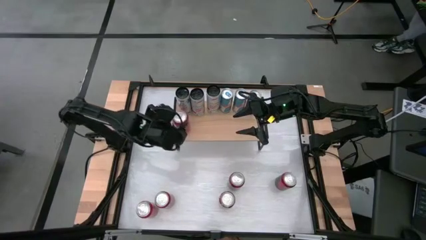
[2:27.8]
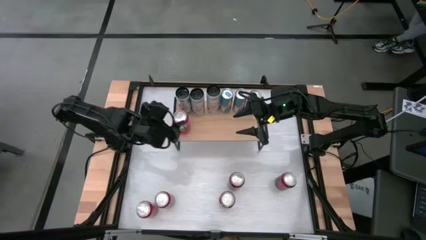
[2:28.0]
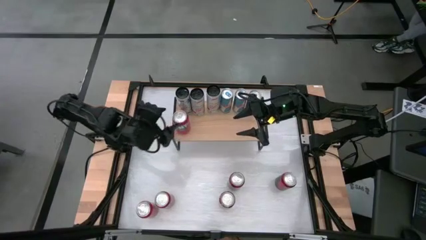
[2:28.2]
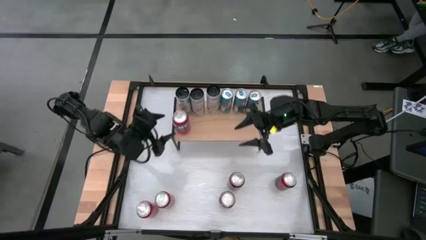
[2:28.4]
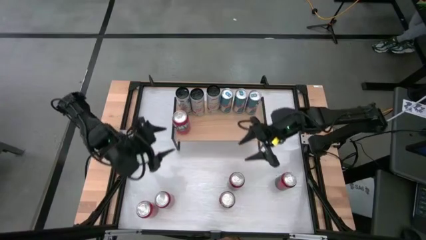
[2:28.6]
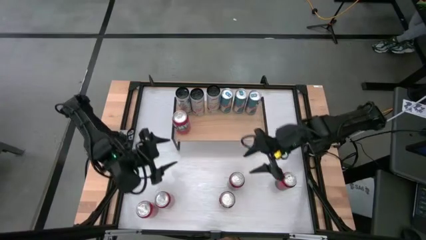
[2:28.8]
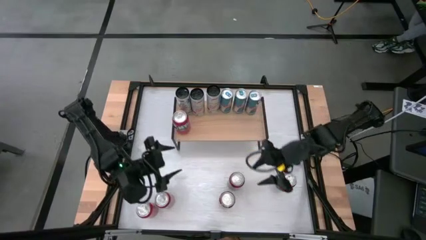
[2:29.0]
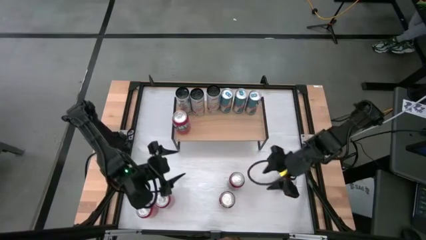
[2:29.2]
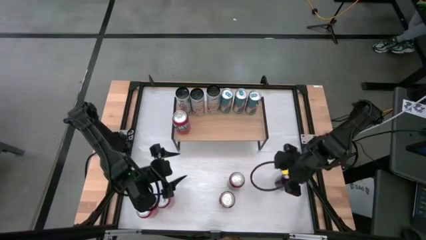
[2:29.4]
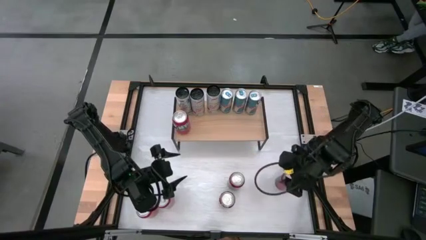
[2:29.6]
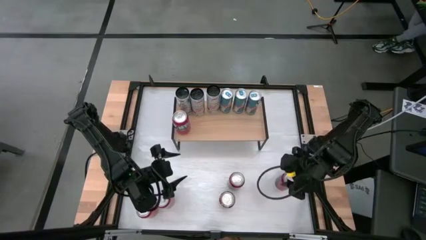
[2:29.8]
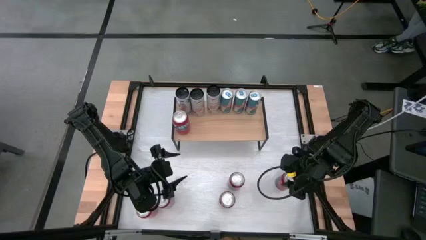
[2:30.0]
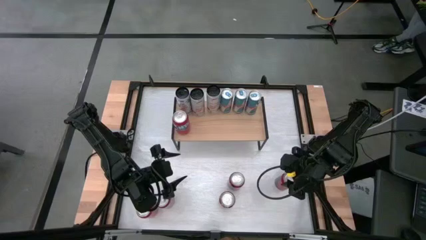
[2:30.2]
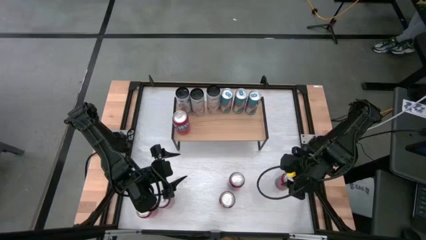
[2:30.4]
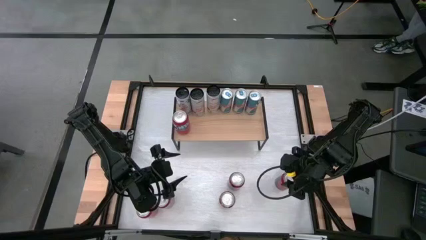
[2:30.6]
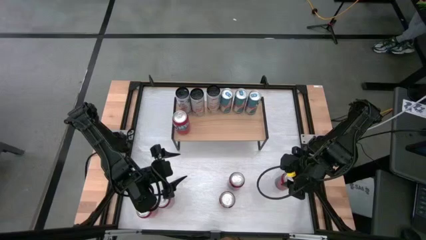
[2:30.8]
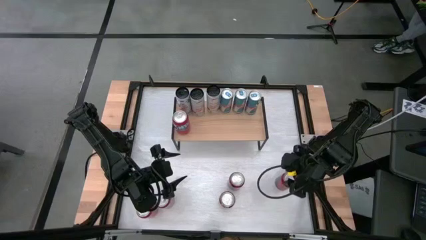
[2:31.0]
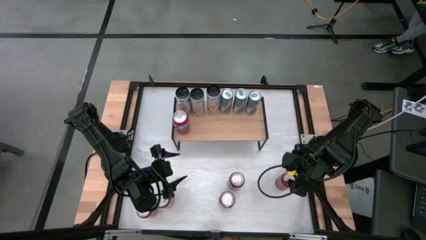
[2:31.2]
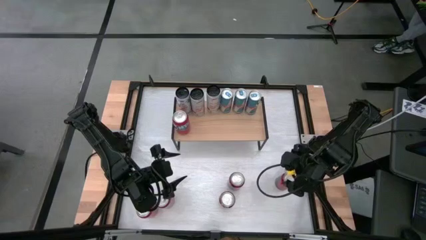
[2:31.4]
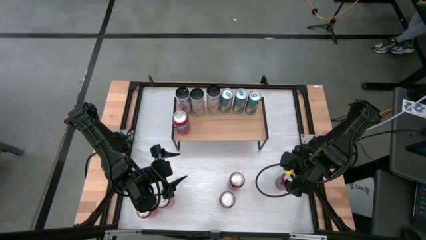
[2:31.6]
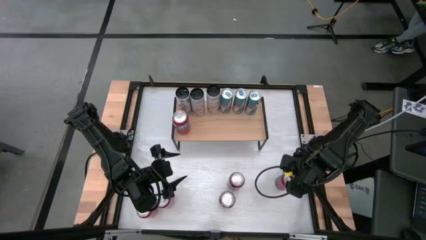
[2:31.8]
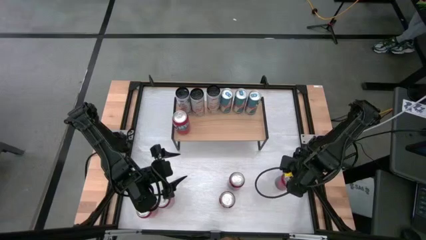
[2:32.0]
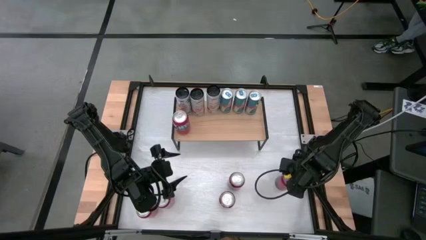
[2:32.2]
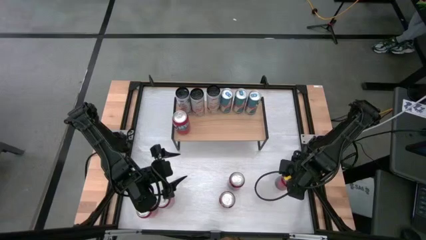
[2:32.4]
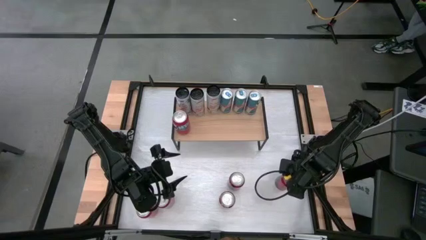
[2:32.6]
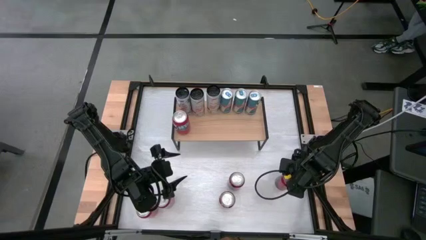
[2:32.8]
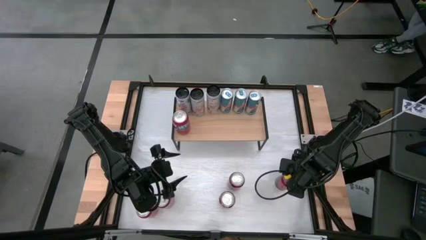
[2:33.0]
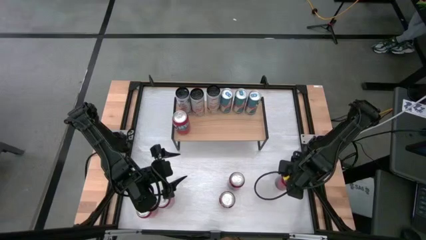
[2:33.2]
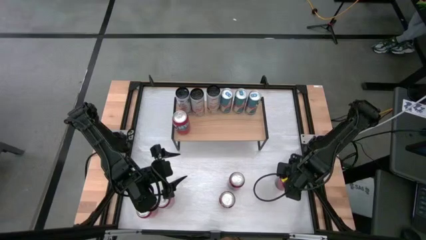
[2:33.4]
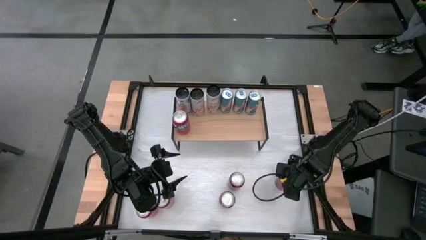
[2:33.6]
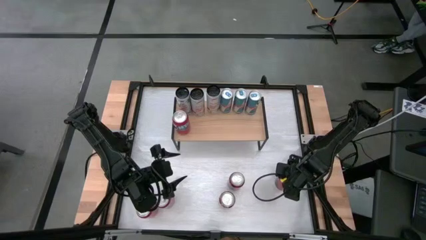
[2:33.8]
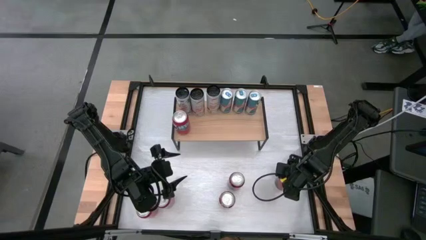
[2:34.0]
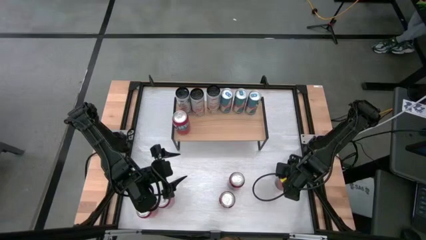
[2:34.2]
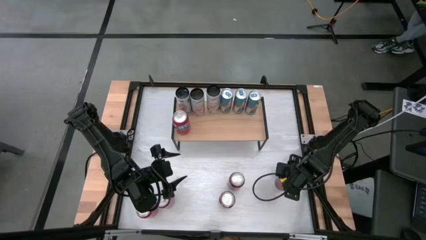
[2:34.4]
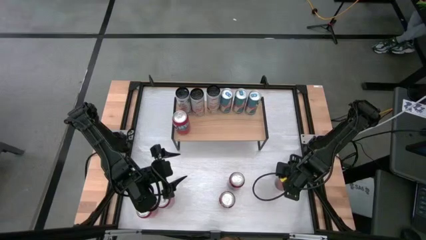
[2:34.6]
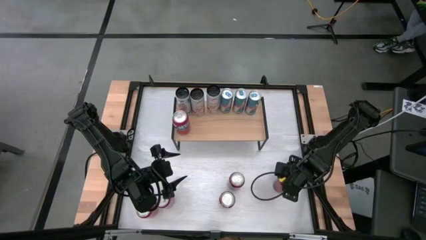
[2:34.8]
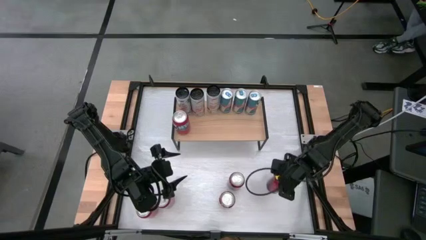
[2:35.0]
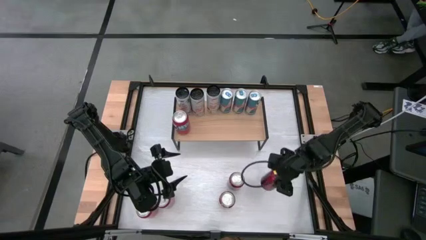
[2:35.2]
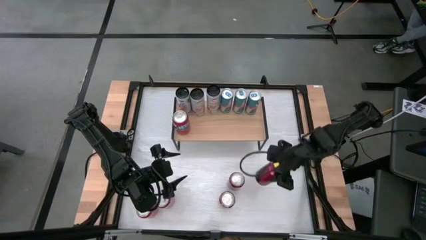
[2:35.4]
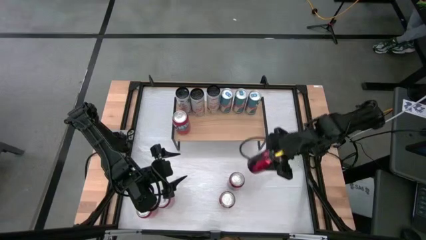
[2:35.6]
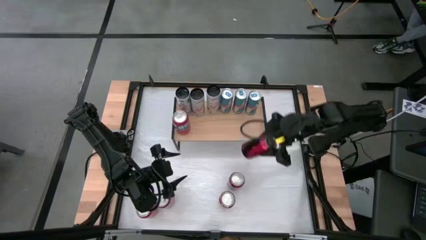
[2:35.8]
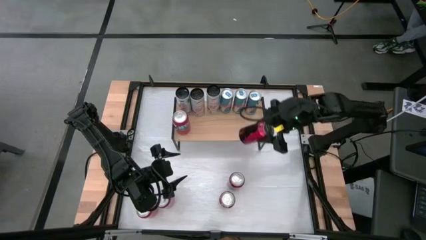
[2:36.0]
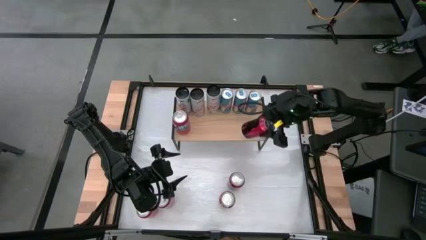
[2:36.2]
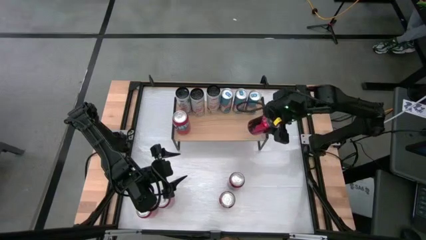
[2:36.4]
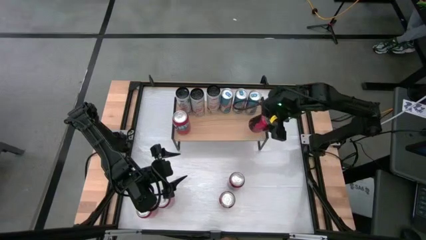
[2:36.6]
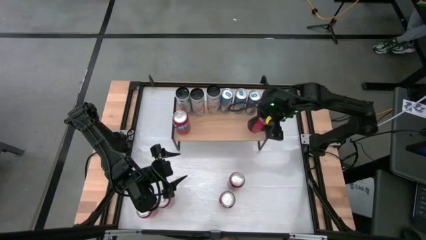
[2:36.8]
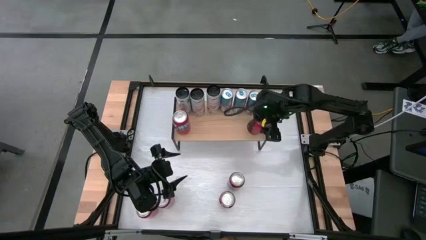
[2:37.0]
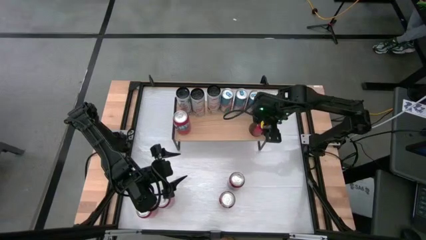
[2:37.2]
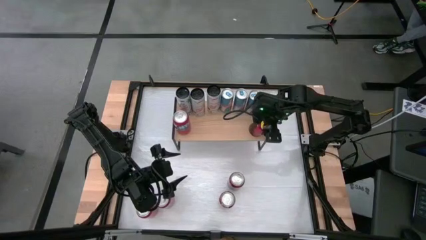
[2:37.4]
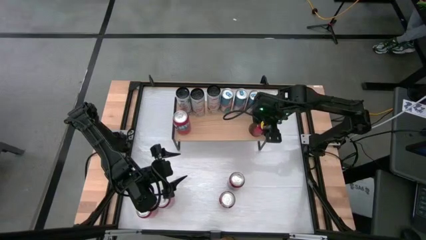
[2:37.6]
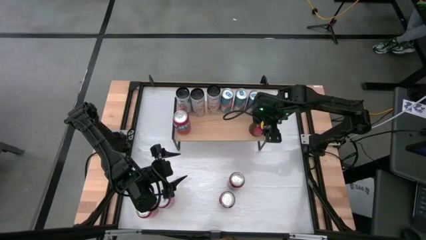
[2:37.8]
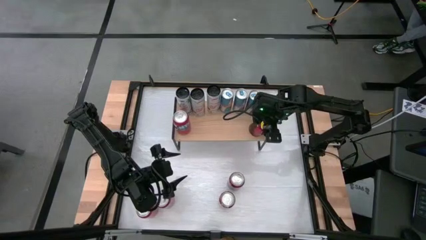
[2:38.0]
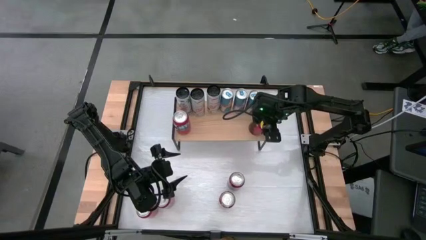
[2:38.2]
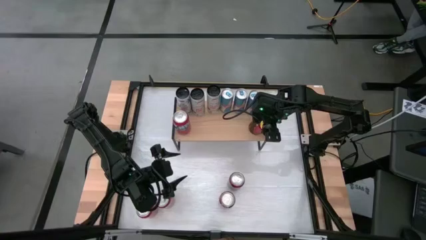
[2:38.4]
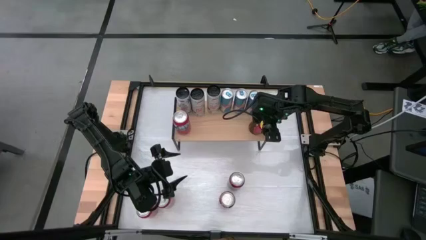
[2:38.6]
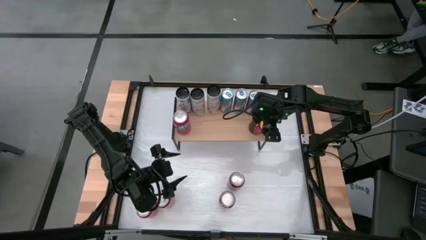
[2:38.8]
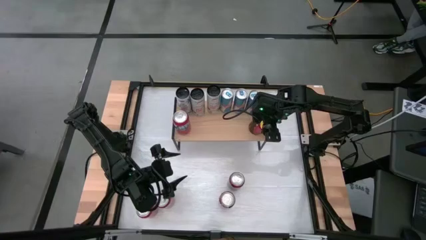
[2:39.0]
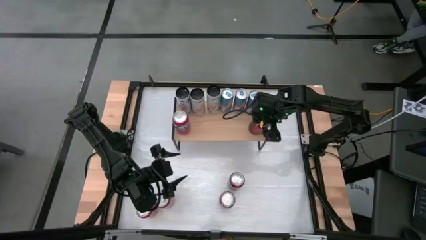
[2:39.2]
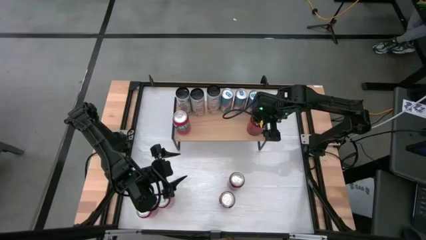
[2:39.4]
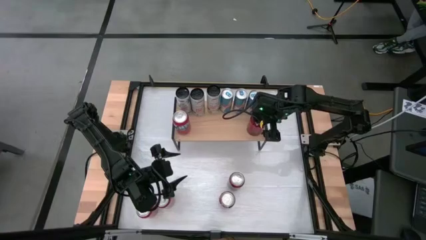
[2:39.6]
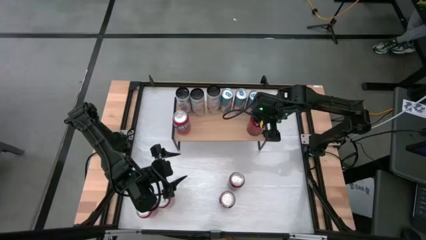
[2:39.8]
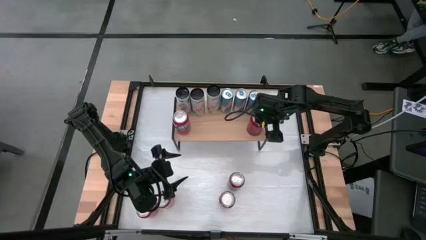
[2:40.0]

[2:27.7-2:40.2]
Task: Place canned beverage on shelf
Put the right red soda can on the shelf aligned with the blue soda can

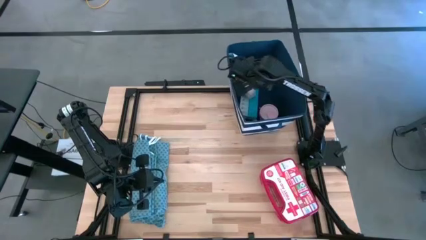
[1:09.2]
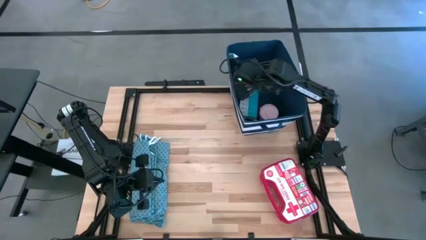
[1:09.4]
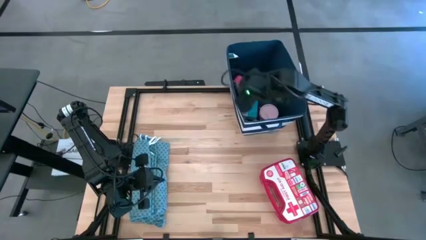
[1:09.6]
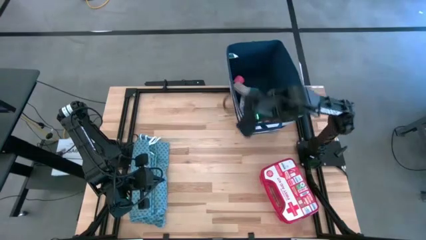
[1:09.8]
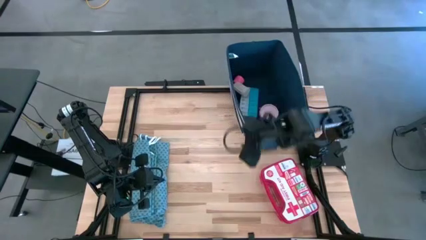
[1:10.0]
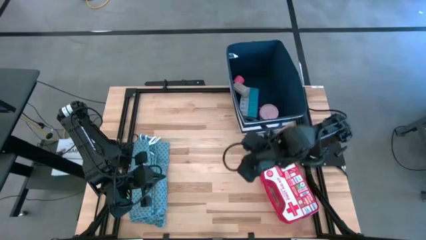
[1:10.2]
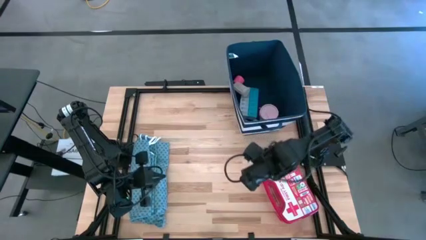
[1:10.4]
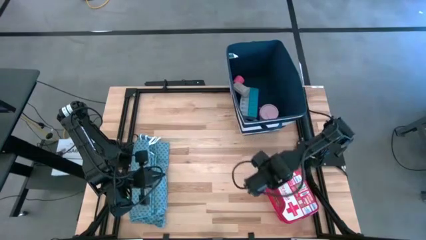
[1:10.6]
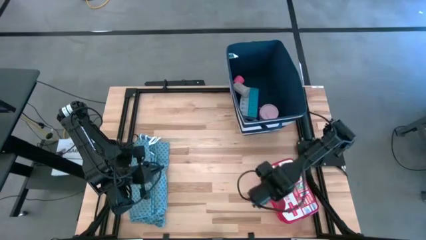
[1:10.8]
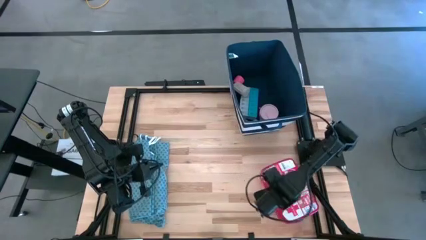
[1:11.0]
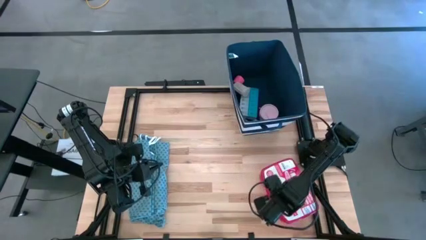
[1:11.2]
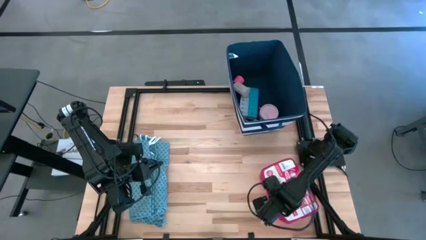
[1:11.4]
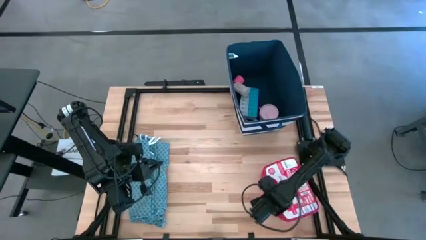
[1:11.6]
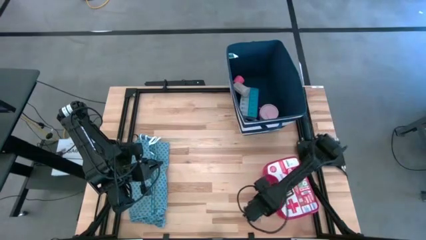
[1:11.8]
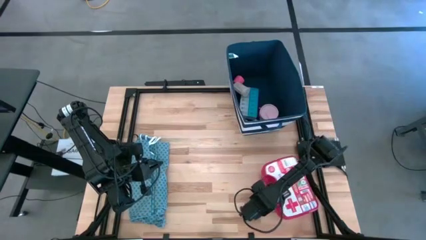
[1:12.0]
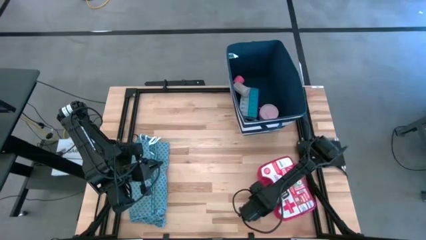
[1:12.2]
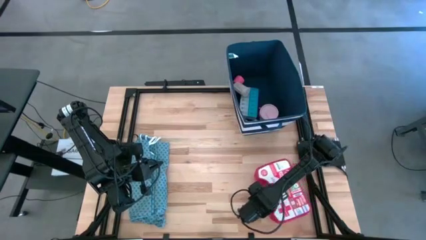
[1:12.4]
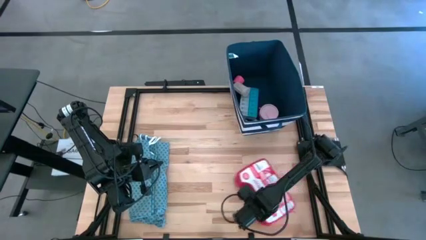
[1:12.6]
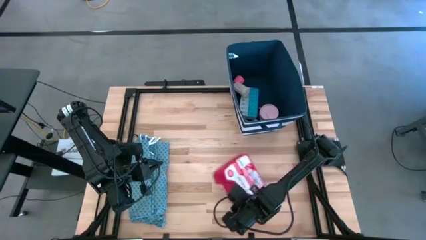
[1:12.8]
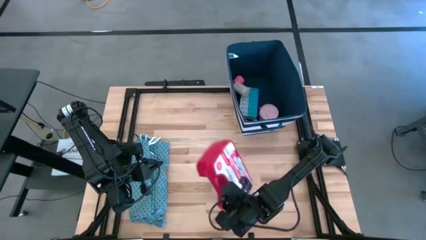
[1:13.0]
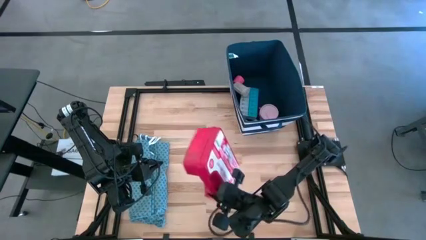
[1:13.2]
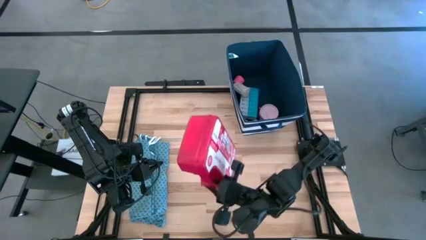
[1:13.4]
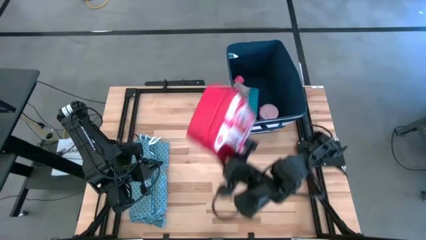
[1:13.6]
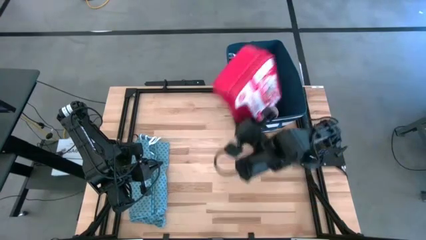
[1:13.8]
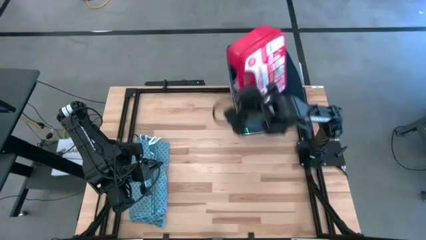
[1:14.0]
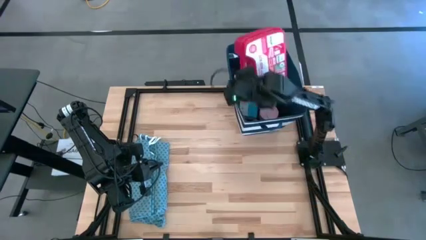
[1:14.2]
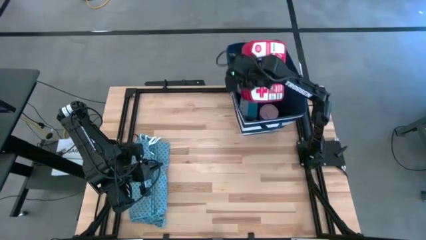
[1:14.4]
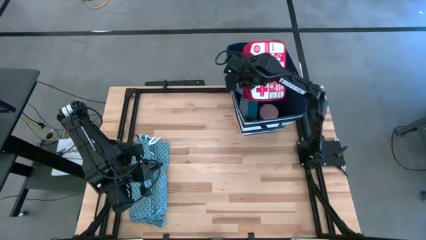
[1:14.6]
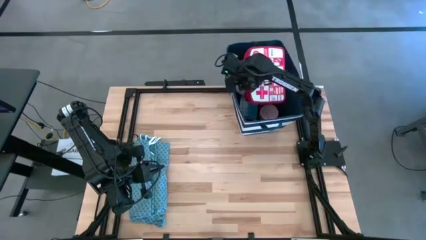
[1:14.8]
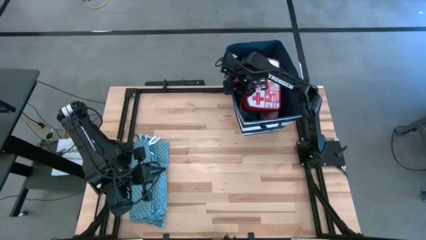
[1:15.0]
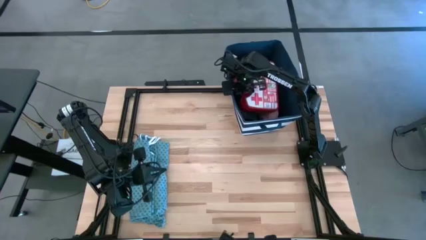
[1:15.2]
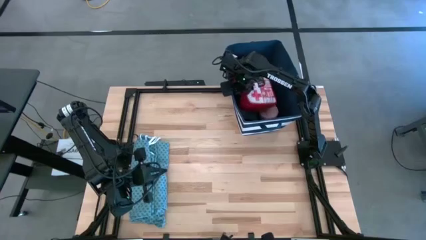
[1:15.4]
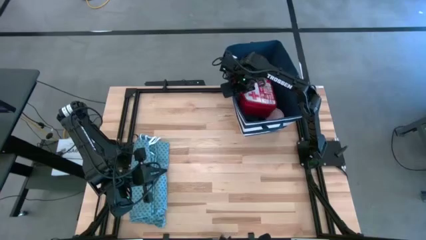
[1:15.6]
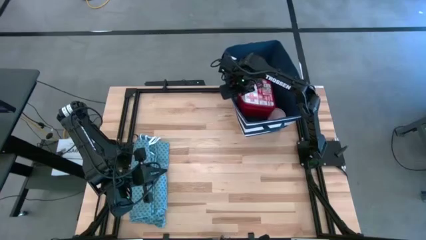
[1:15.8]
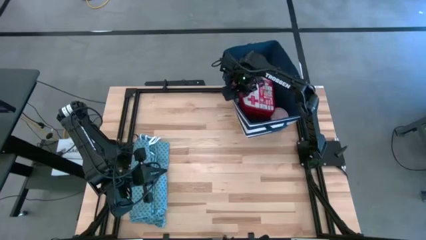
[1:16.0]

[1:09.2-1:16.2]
Task: Pick & place medical supplies in basket/bin
Put the red first aid kit into the blue bin
